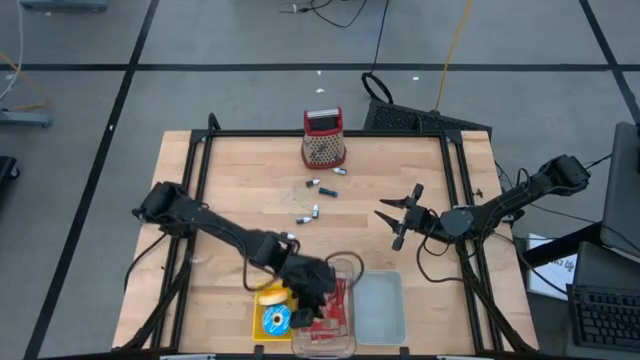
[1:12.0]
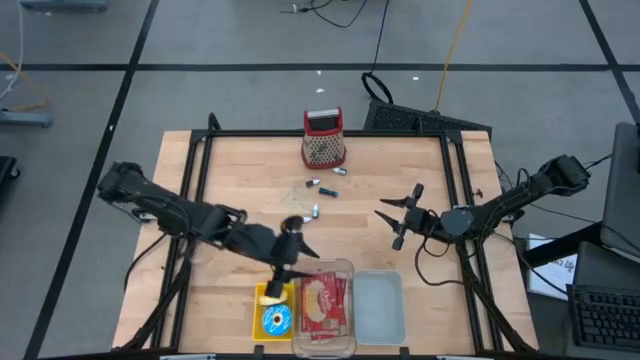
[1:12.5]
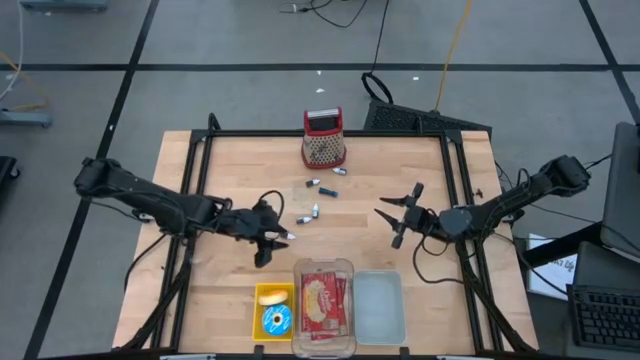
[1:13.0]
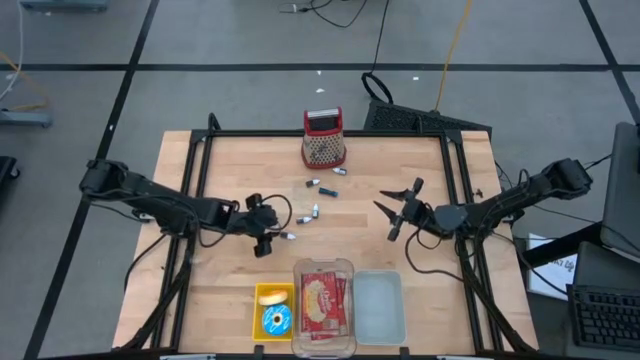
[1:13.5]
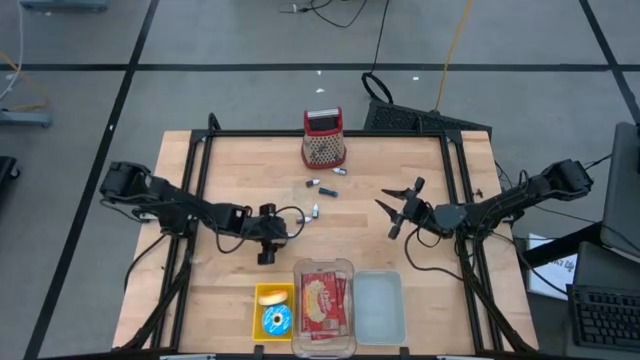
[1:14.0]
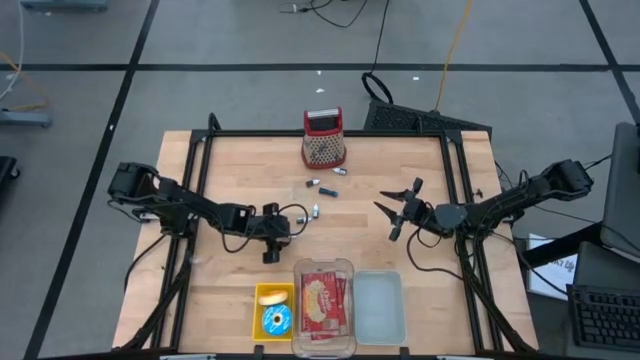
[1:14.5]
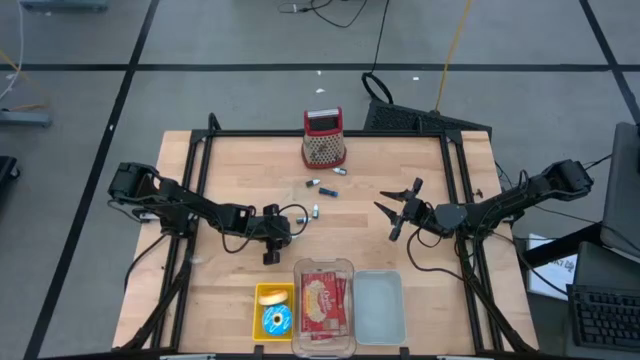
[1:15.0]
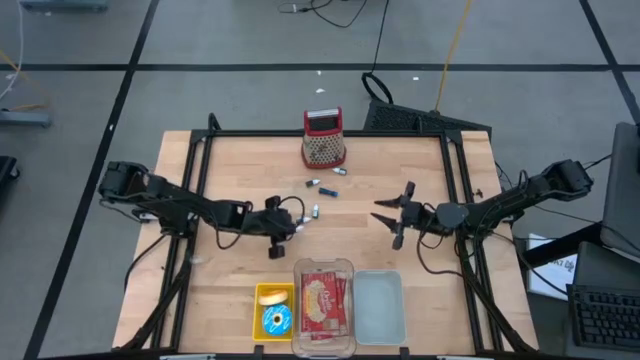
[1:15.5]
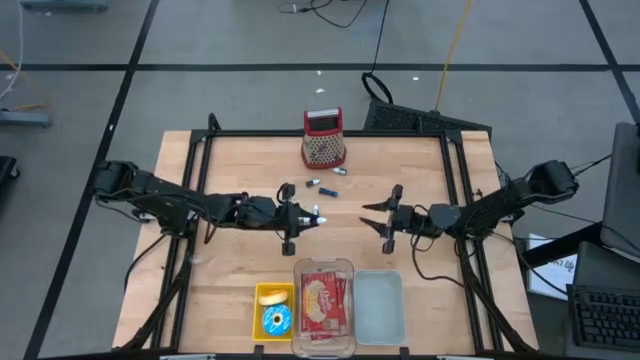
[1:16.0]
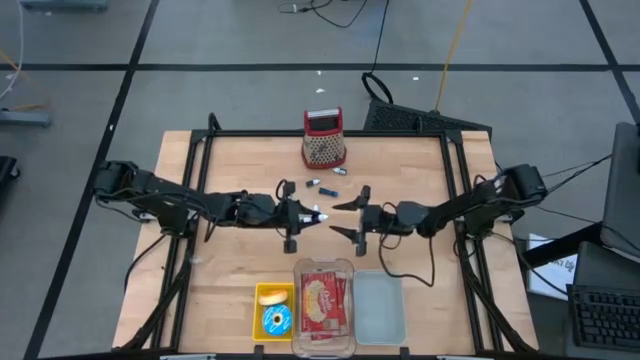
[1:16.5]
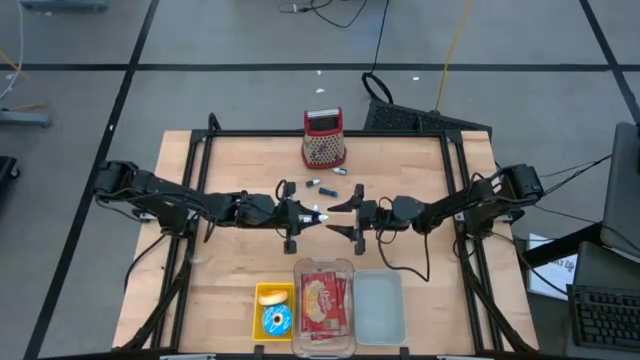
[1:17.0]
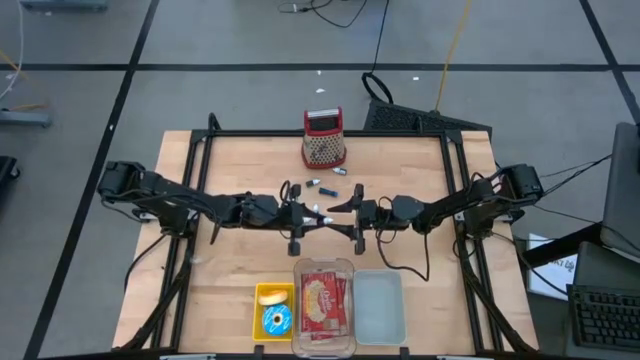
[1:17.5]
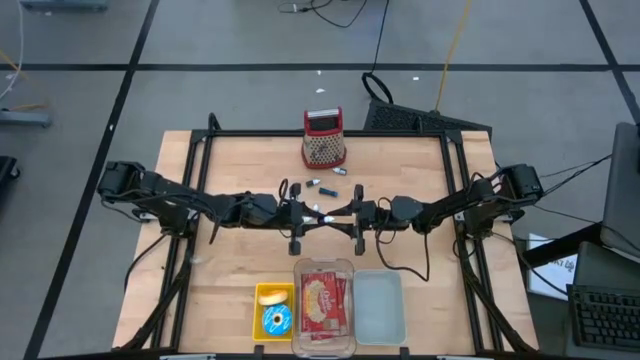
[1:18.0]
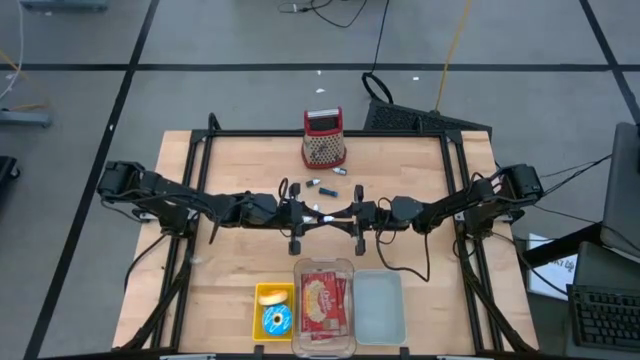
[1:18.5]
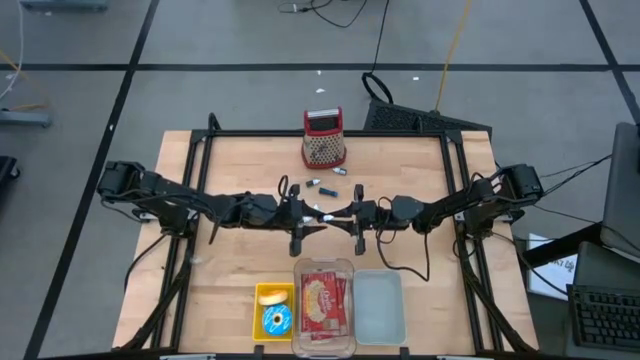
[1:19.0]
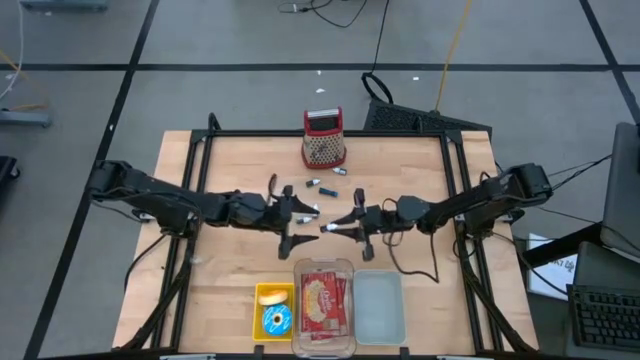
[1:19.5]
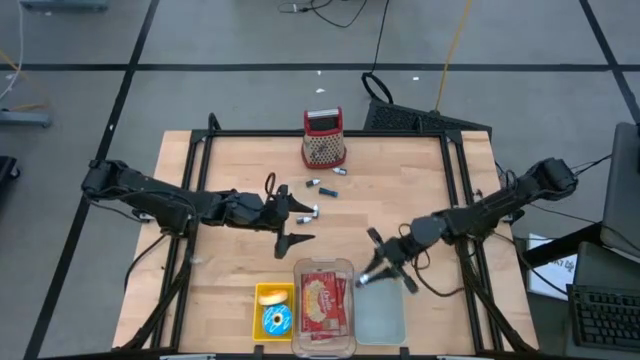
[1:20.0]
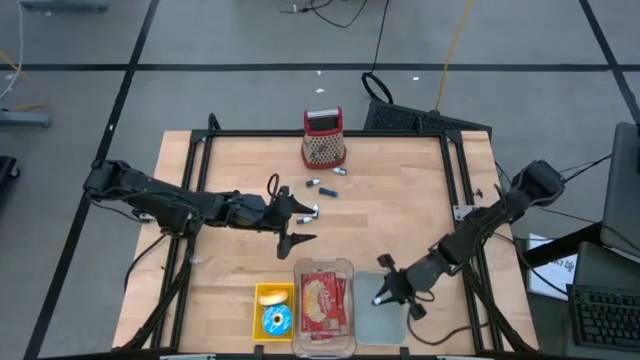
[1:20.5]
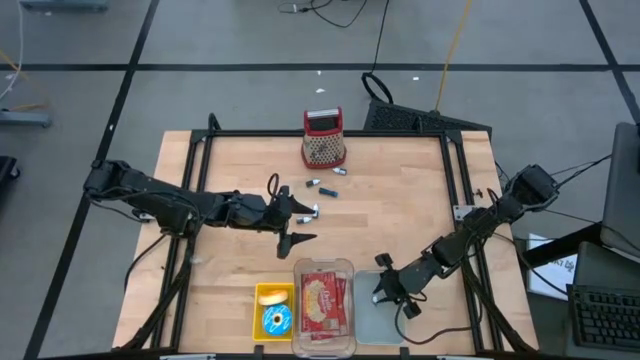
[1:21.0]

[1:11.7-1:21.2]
Put the purple food coloring bottle into the gray bin

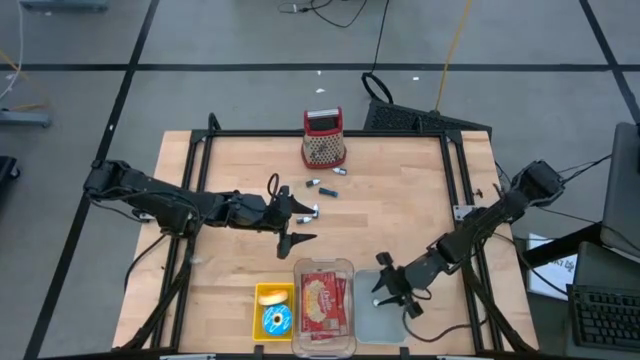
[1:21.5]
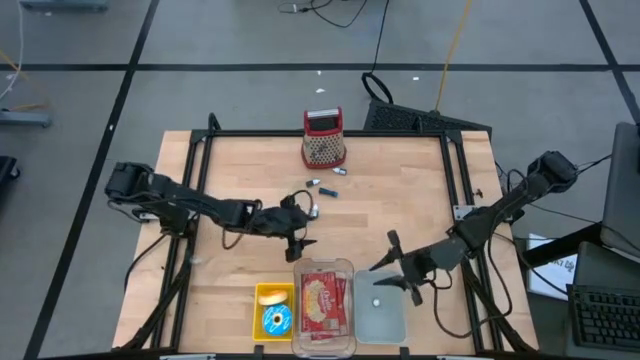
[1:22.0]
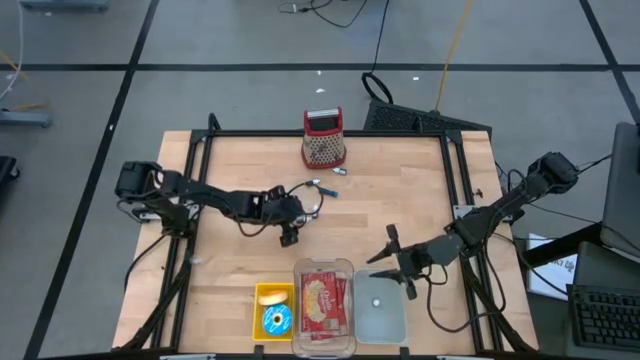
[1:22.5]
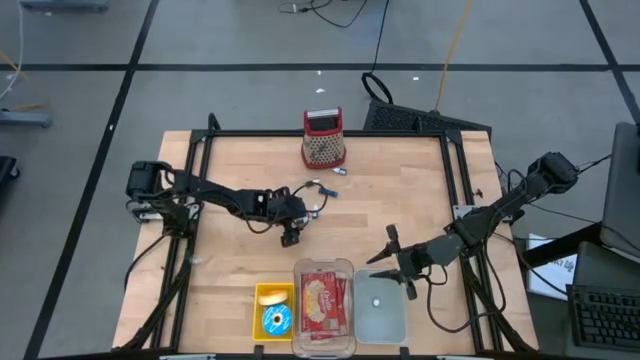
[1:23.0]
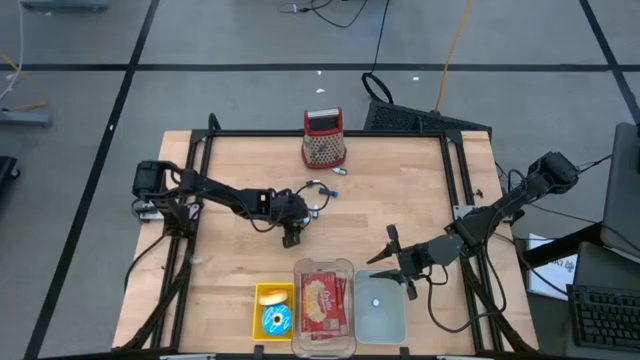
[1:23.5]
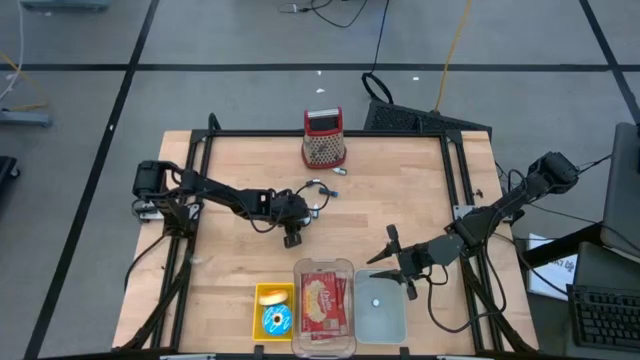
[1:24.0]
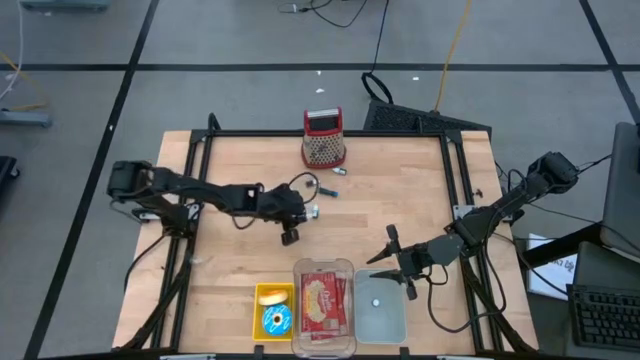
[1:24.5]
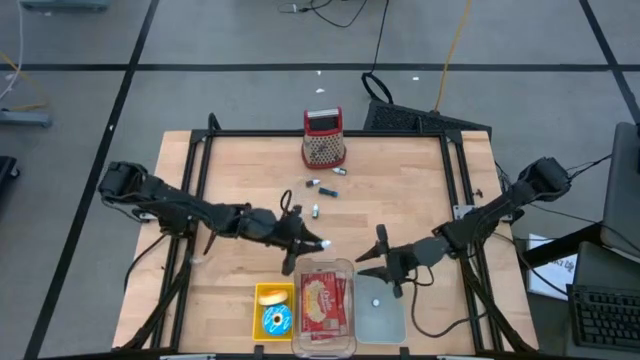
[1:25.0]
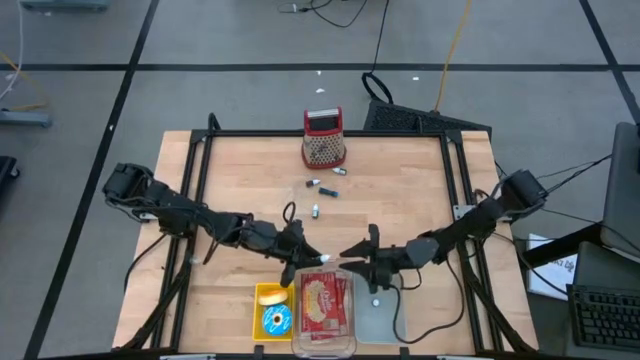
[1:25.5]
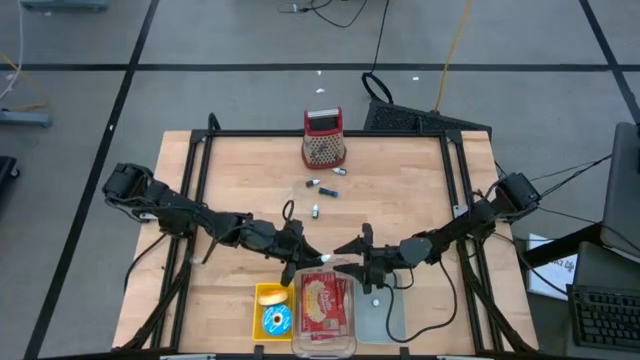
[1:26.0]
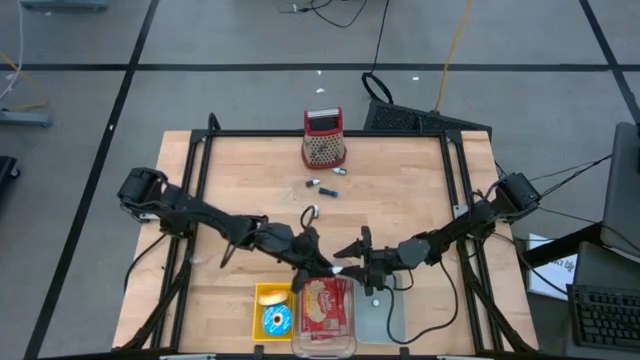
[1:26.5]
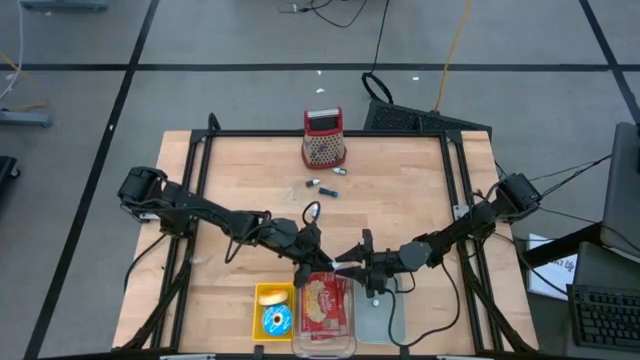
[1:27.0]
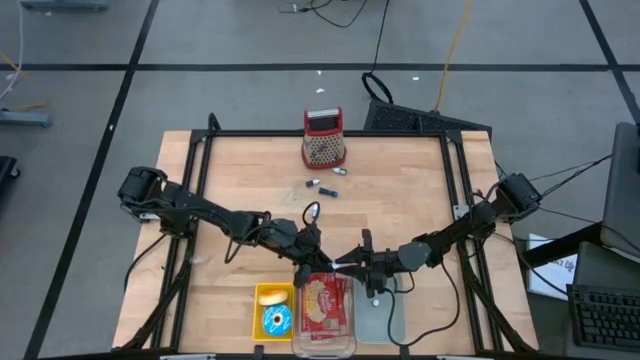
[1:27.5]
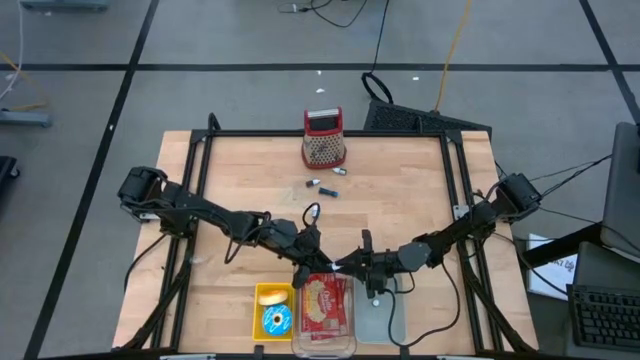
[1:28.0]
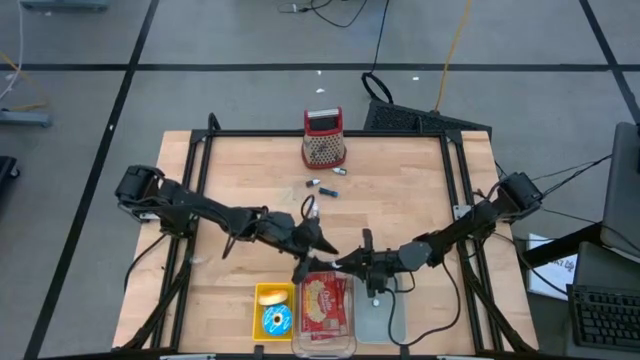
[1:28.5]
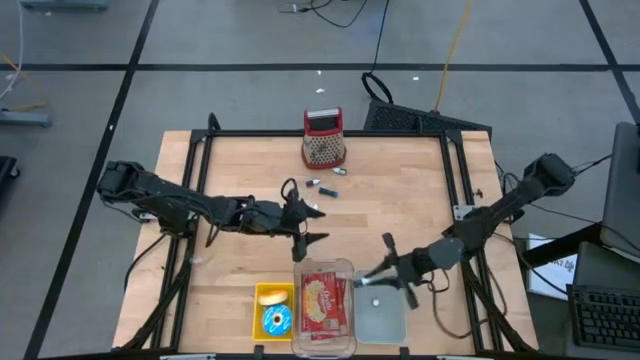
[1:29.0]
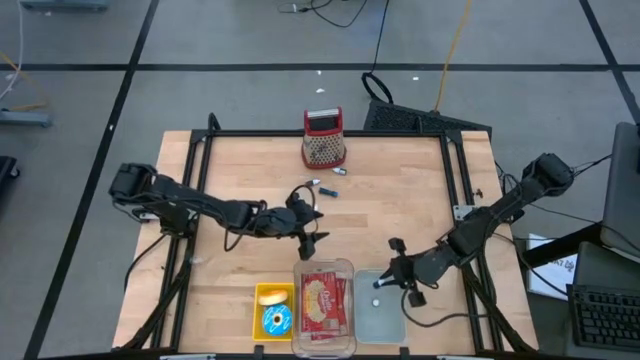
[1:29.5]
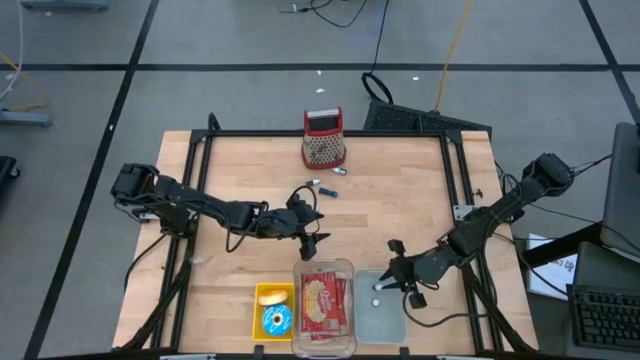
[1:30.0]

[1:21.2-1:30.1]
Put the bottom black food coloring bottle into the gray bin

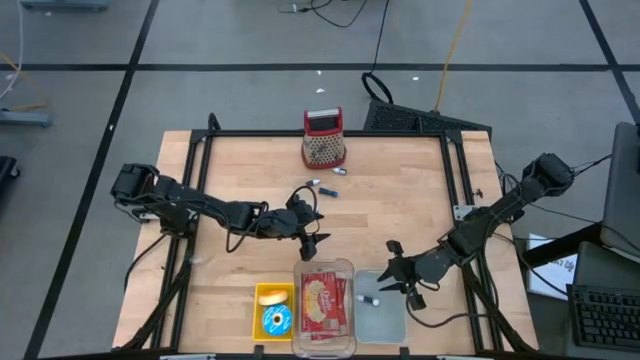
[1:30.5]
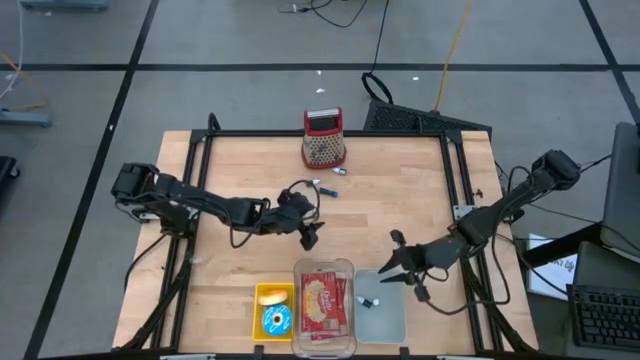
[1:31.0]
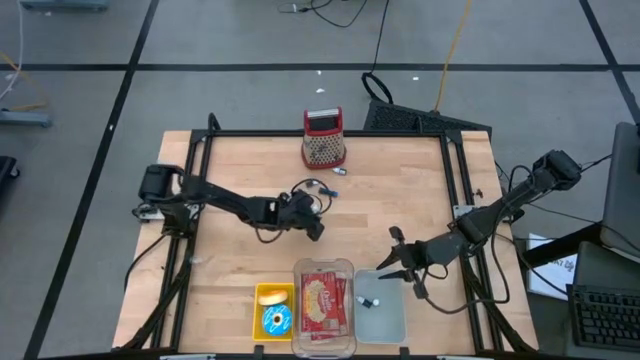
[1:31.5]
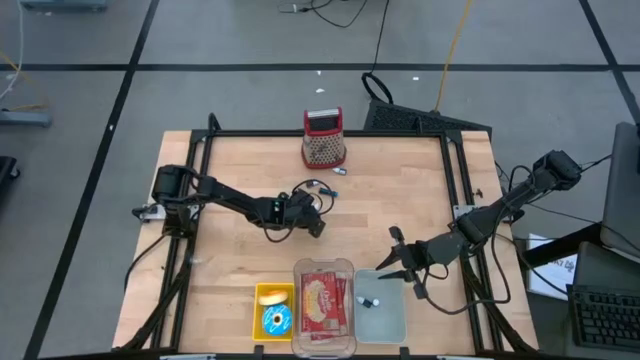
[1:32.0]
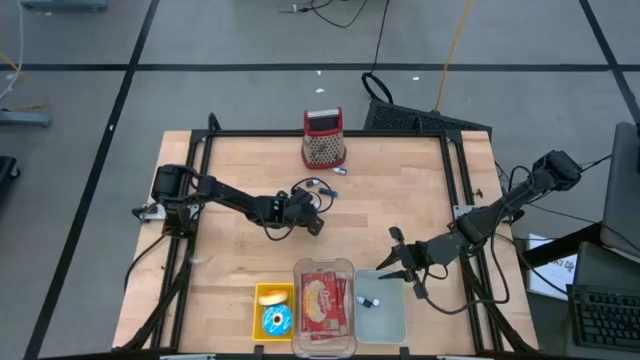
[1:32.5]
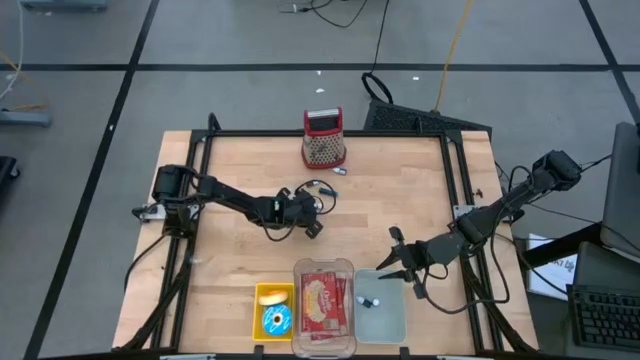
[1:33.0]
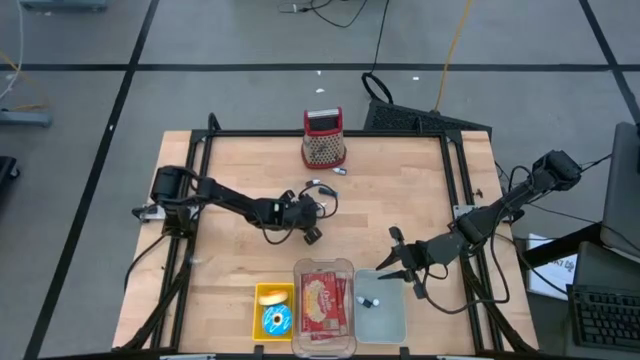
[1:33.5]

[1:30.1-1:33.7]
Put the green food coloring bottle into the gray bin
